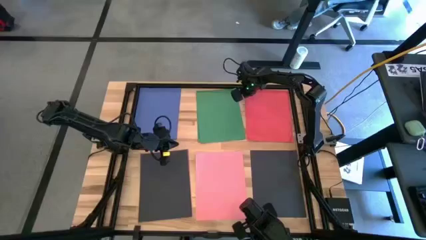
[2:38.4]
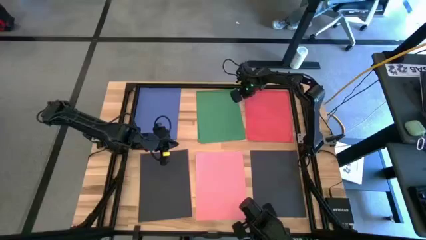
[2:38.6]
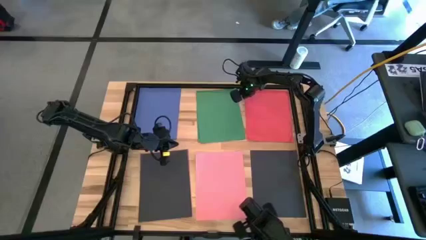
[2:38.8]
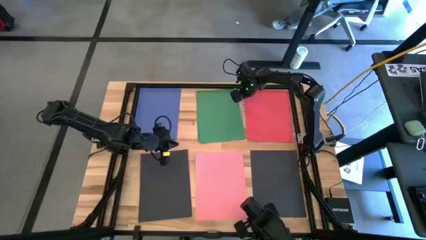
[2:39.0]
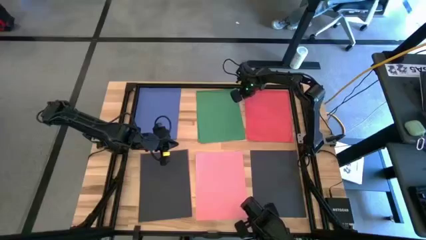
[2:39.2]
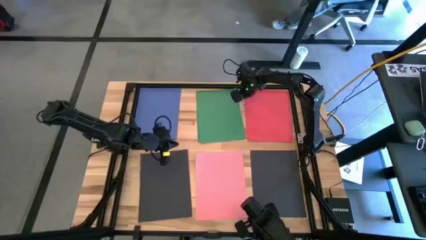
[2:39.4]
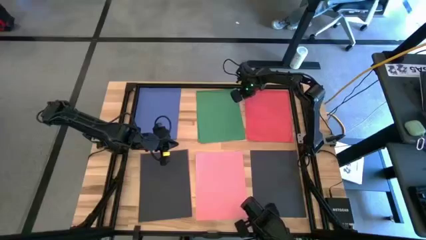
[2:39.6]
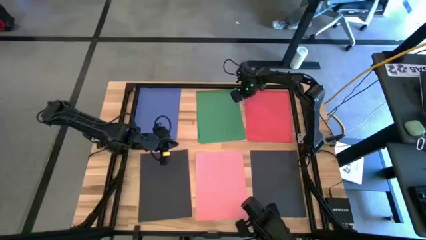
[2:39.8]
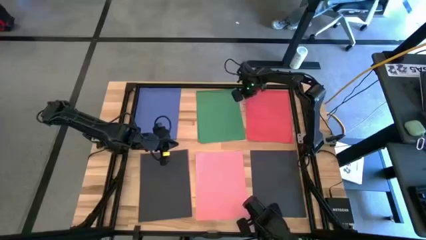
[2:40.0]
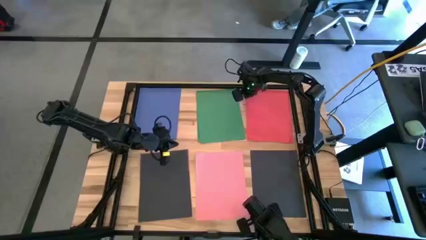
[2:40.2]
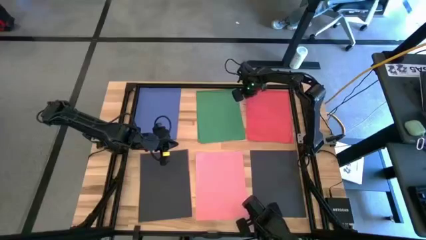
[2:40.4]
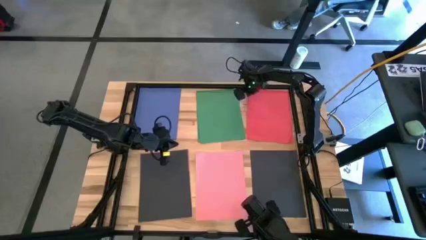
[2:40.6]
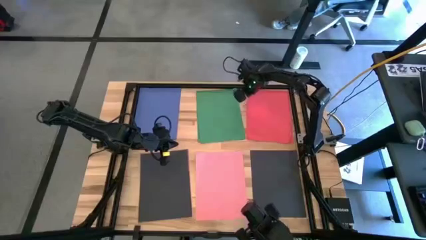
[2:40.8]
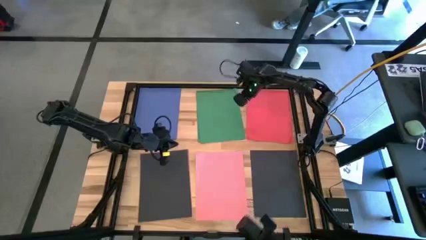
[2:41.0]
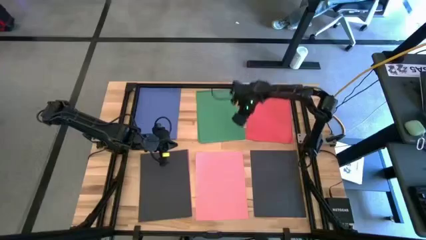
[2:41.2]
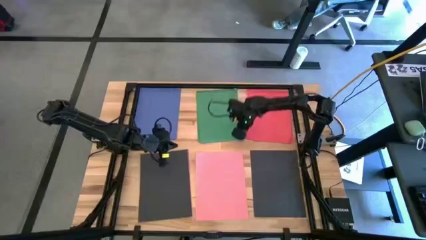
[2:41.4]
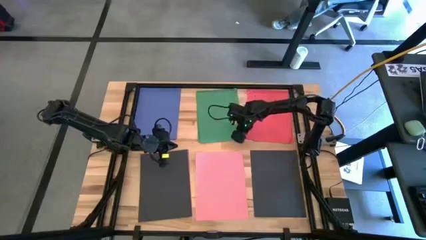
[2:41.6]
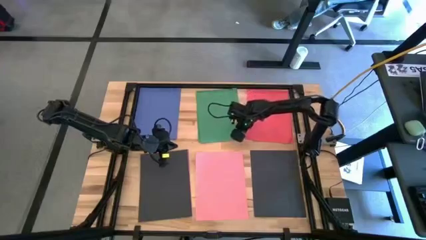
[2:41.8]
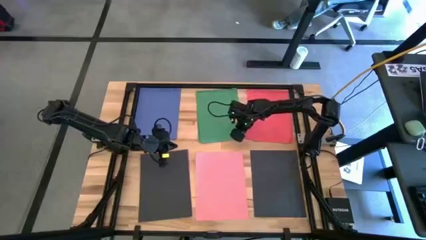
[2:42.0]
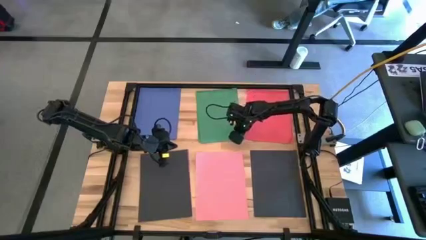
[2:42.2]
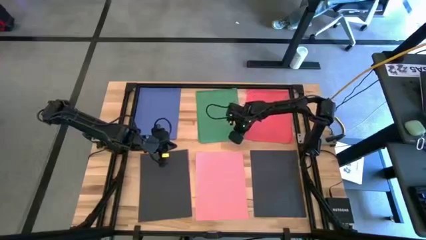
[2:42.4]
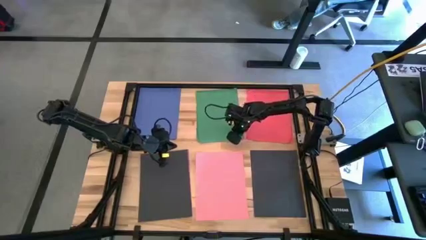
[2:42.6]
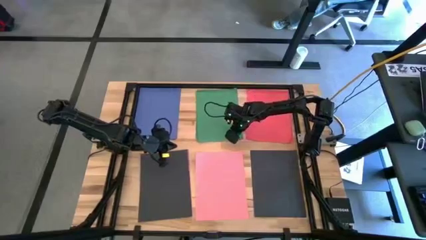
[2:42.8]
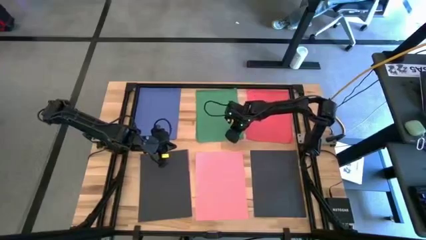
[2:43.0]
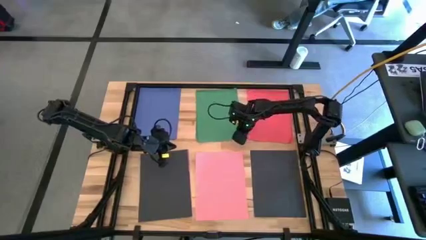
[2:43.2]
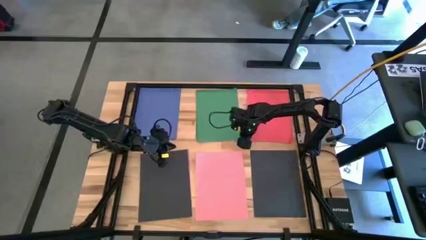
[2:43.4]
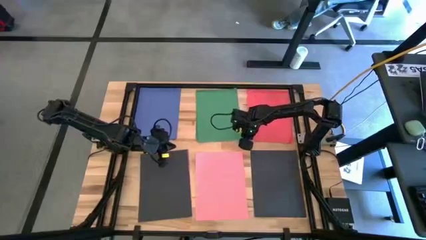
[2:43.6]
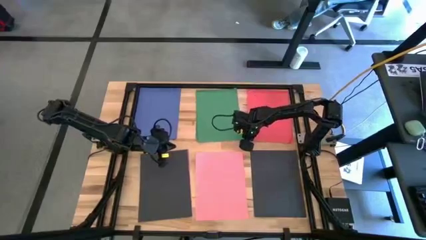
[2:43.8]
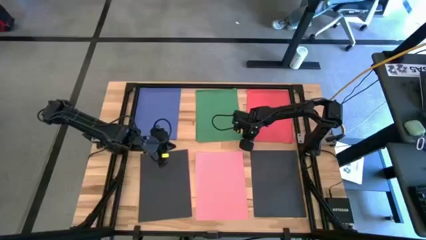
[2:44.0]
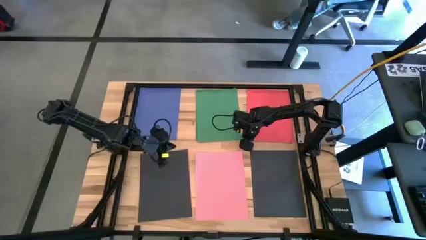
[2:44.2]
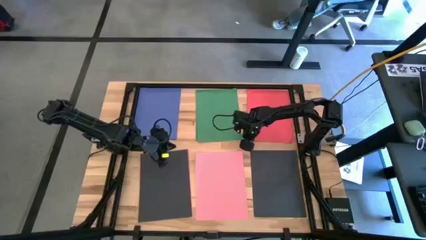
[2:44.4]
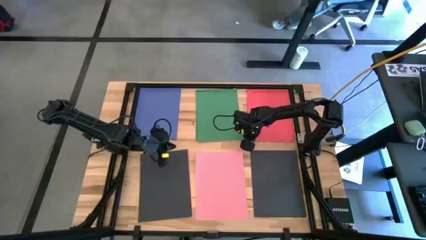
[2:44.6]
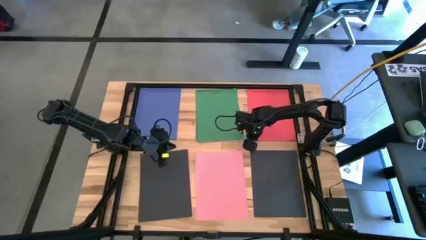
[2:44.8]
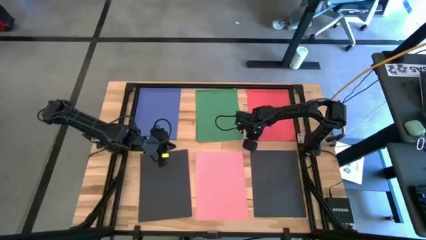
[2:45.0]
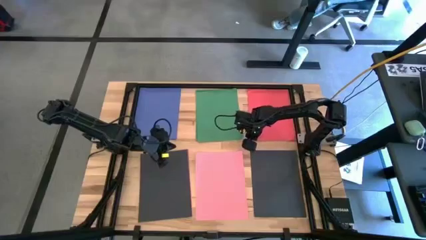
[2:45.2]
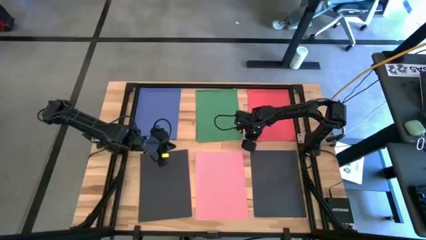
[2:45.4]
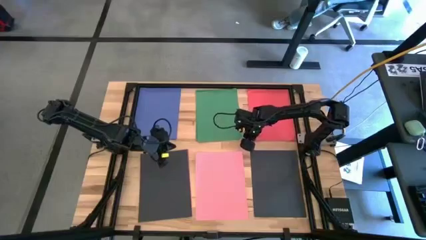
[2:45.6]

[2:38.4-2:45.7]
Task: Organize paper
Adjust the green paper

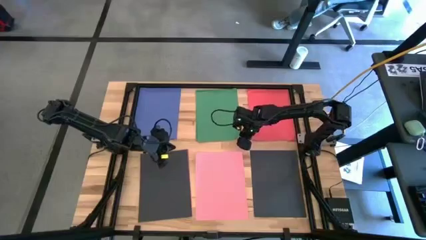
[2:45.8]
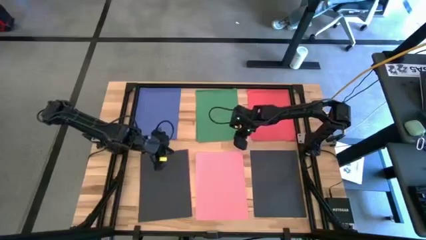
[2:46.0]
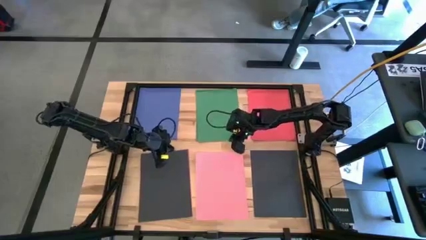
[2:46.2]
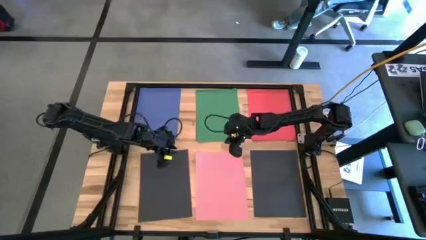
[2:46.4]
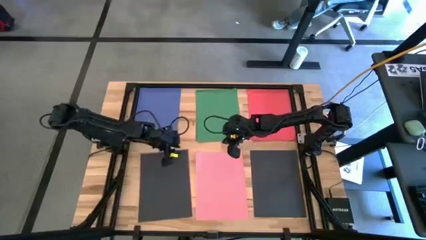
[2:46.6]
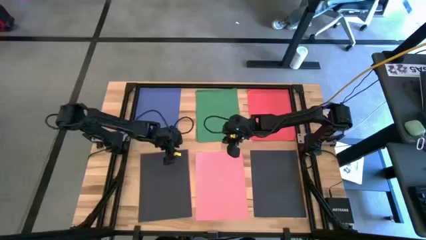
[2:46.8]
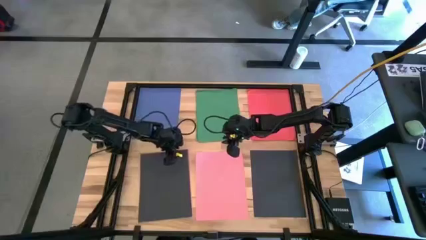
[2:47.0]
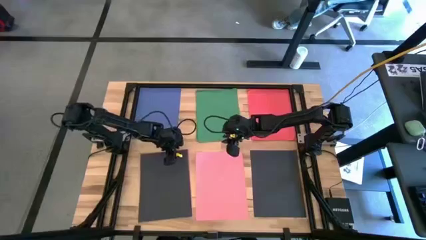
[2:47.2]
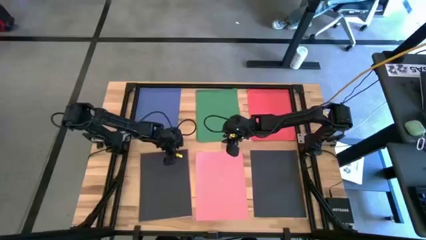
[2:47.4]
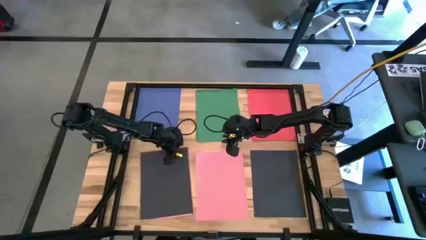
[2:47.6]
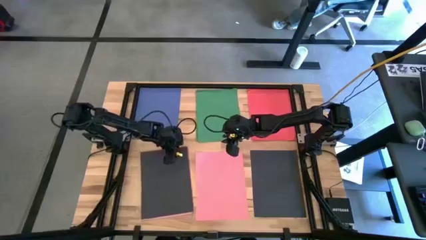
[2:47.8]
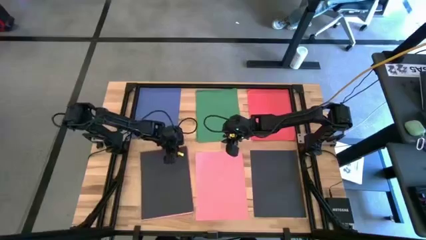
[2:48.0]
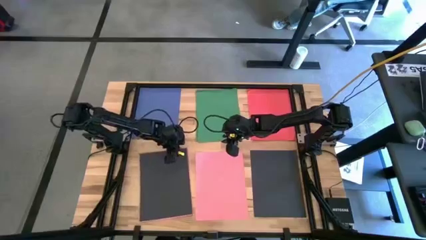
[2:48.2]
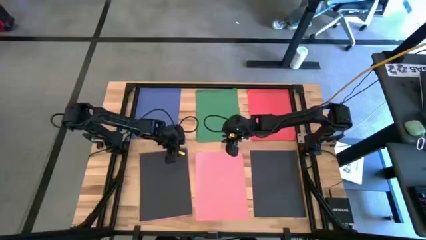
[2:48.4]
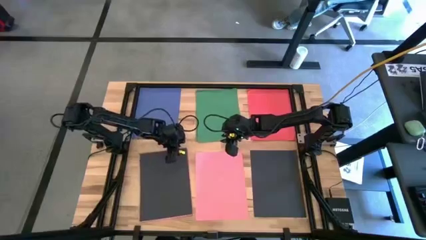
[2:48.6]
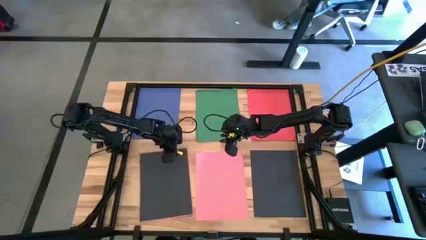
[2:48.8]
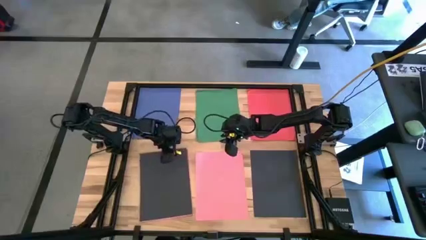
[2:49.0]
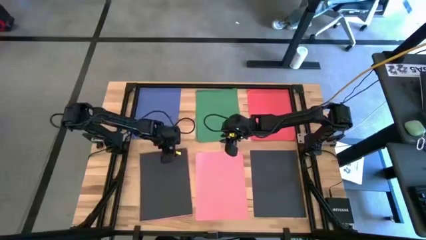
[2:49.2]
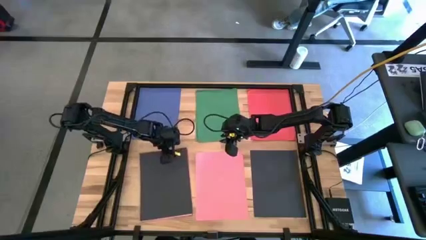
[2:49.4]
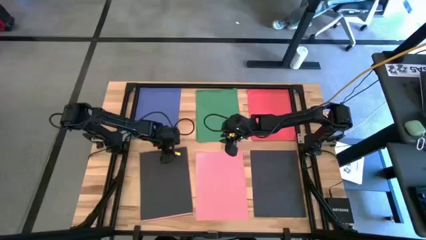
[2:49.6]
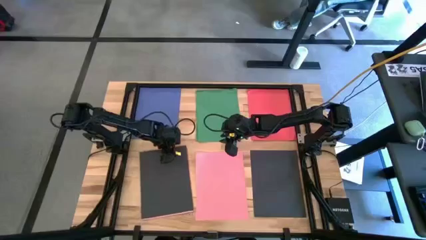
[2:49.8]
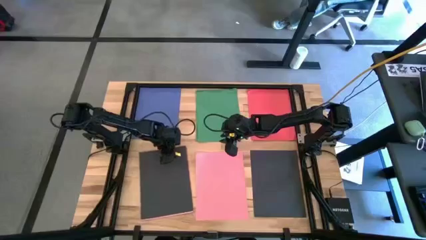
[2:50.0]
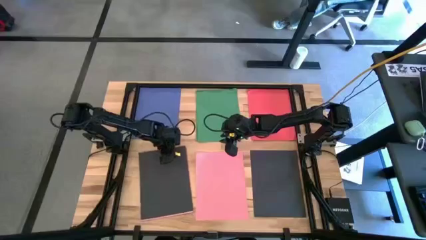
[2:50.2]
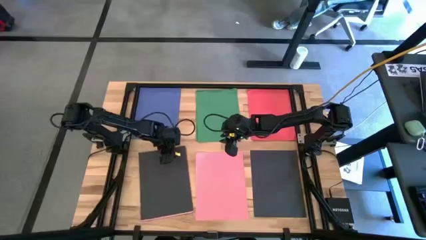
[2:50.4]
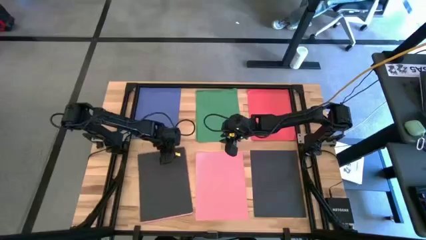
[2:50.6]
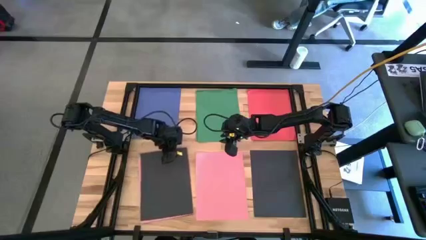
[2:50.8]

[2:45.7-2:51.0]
Stack the black paper on top of the other black paper

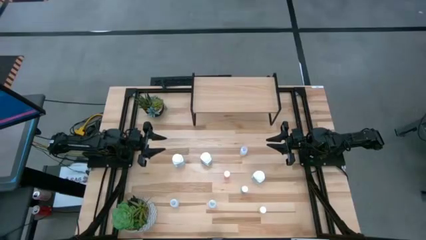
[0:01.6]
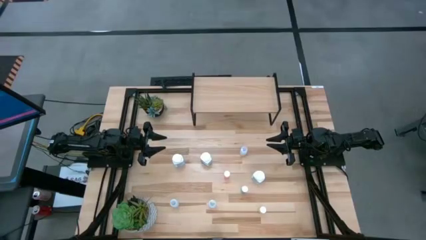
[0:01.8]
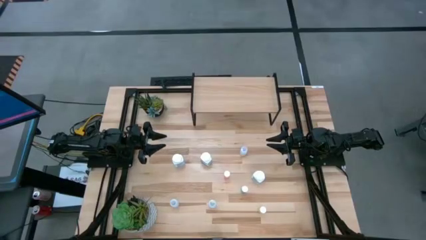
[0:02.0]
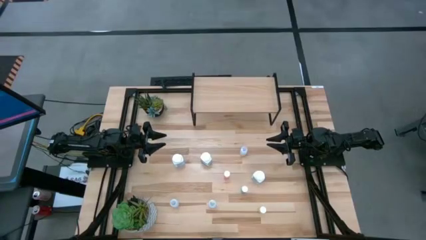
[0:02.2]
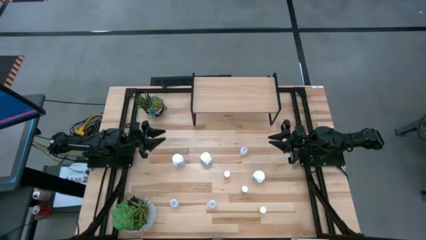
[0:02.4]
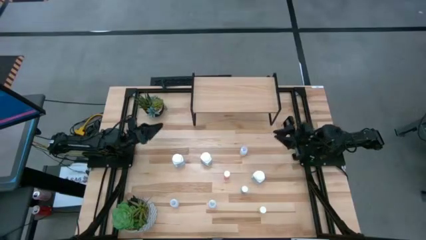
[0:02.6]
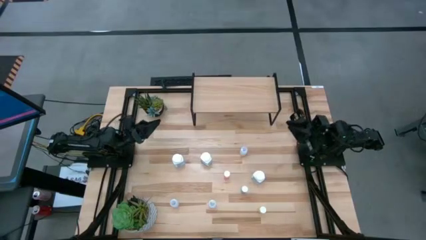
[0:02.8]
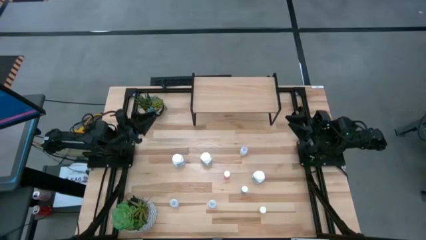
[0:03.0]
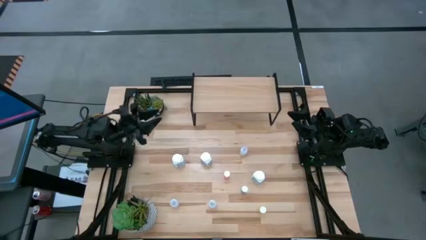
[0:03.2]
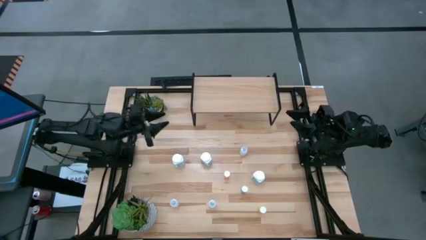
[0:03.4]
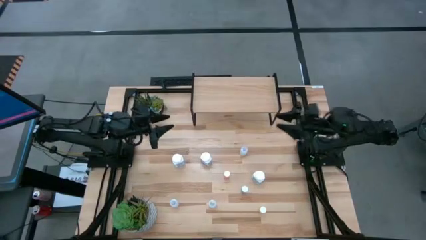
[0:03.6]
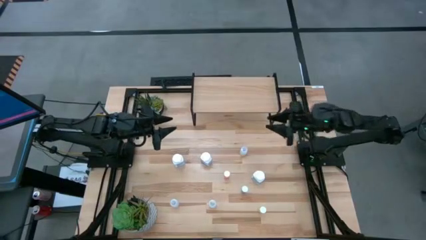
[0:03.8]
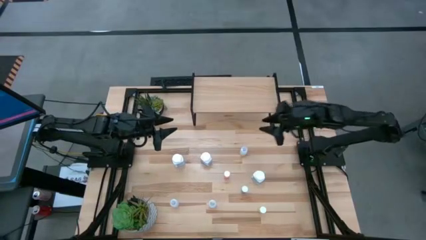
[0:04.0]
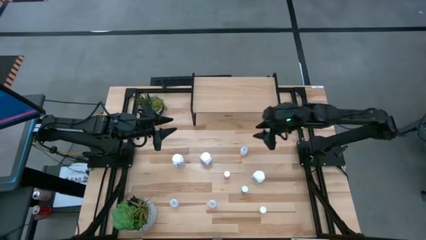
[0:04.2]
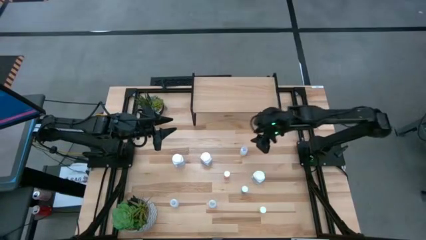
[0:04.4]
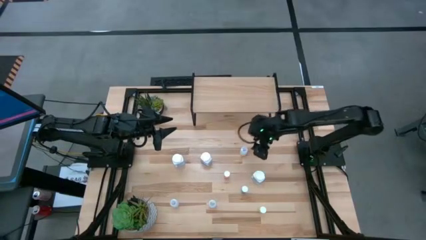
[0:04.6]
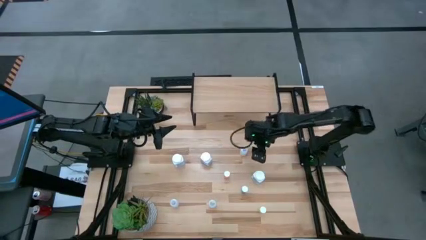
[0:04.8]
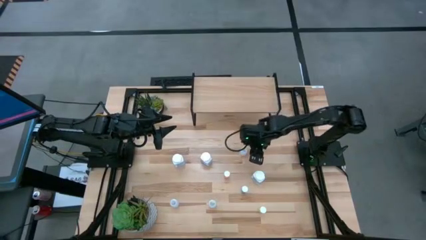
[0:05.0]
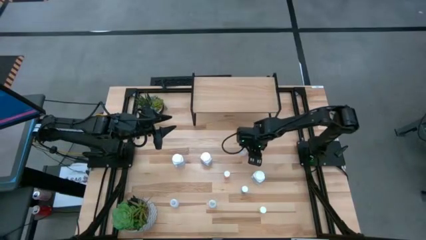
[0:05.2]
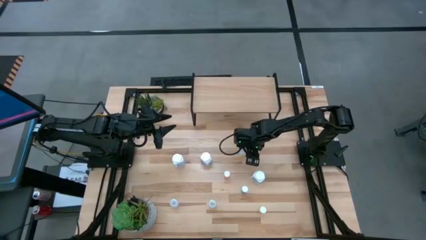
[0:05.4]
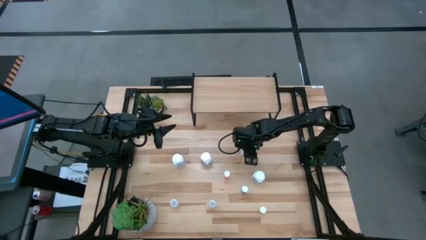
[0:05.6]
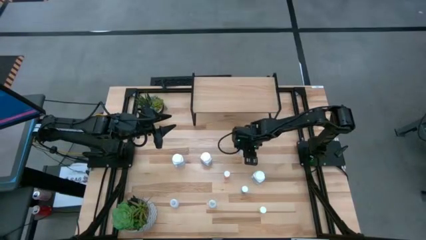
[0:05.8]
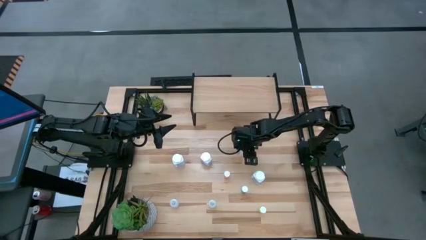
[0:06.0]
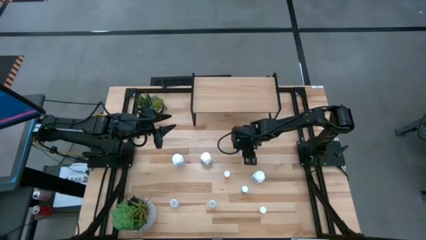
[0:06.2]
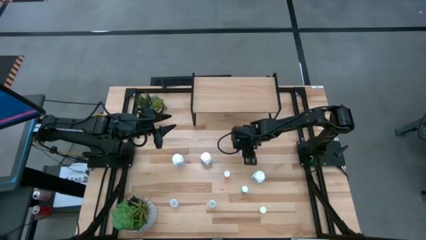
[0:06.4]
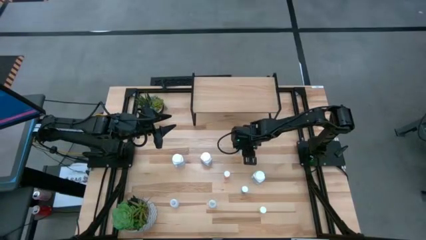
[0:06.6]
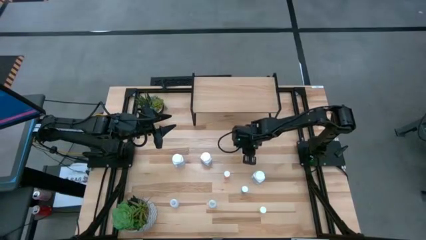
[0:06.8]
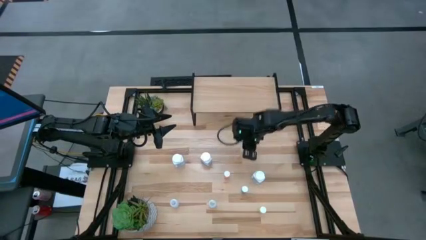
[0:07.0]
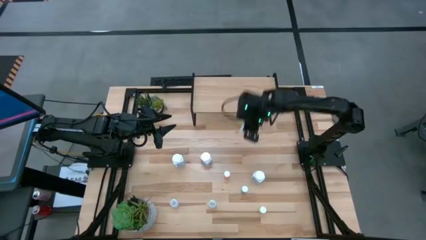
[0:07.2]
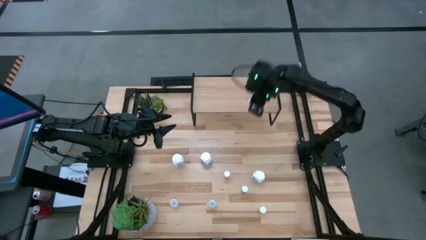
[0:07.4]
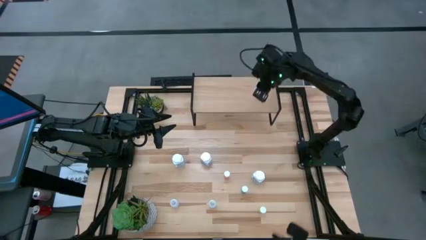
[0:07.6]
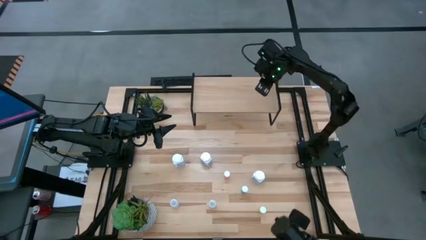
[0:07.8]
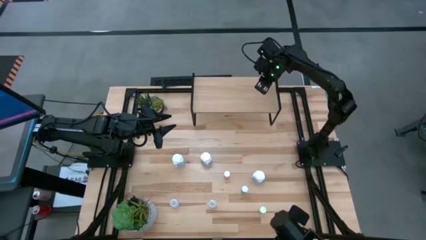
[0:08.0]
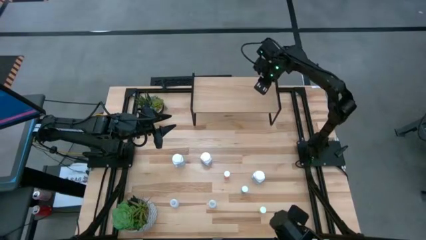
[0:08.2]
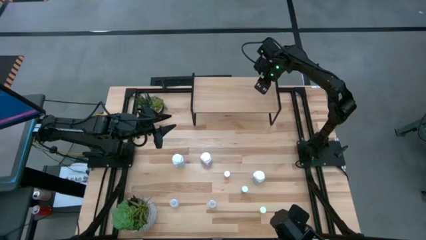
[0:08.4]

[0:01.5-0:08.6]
Task: Pick and place medicine bottles onto shelf by color
Put the top transparent pill bottle on the shelf
